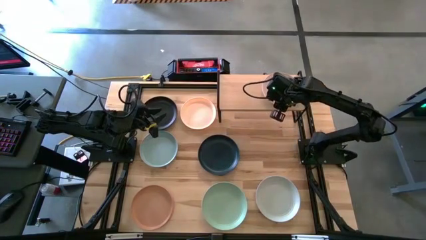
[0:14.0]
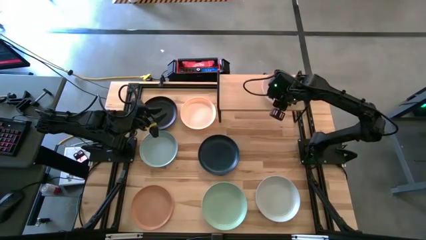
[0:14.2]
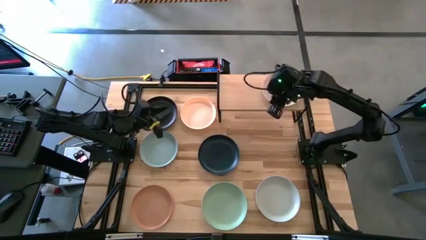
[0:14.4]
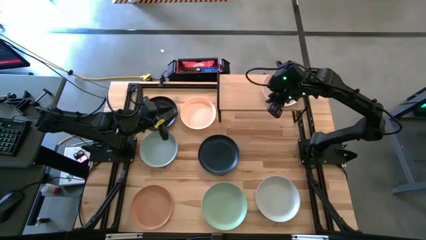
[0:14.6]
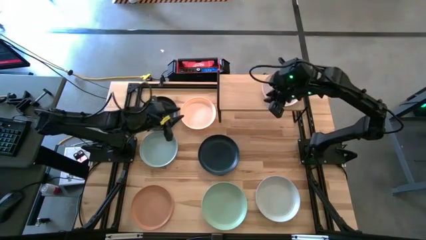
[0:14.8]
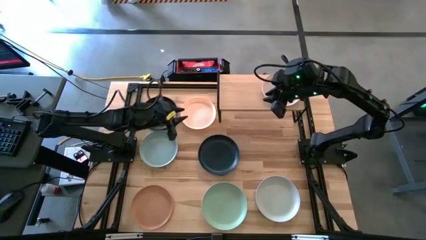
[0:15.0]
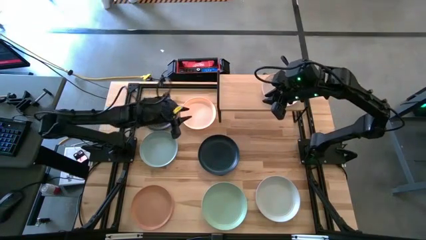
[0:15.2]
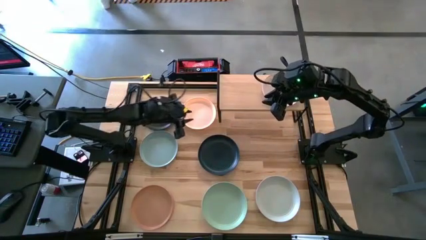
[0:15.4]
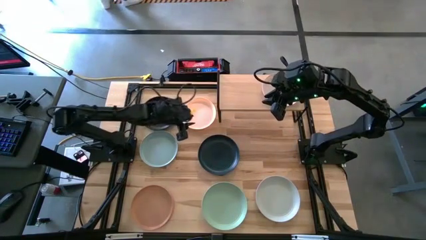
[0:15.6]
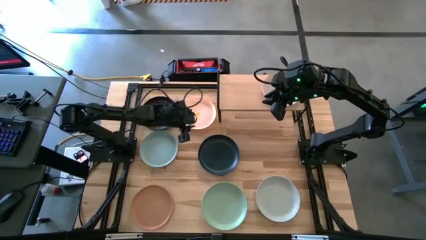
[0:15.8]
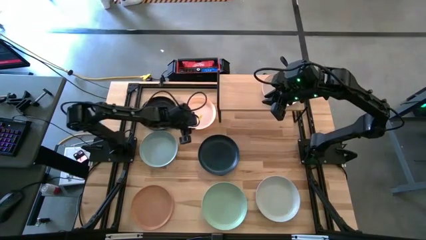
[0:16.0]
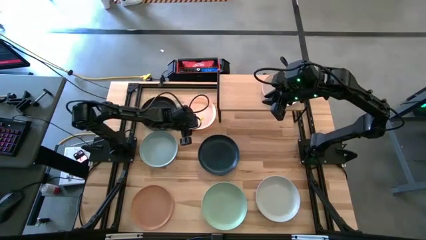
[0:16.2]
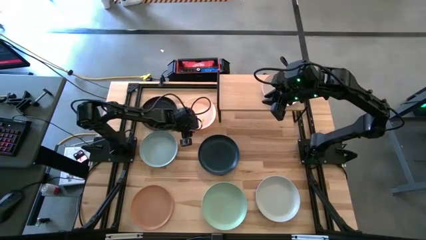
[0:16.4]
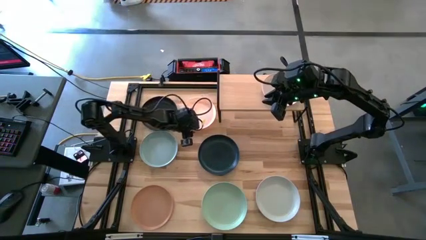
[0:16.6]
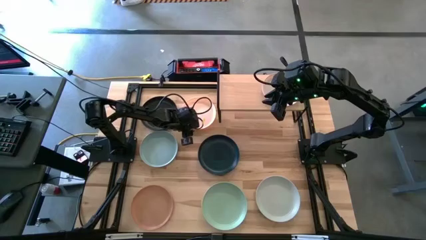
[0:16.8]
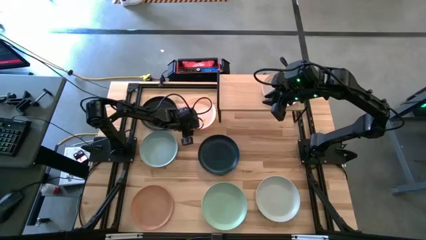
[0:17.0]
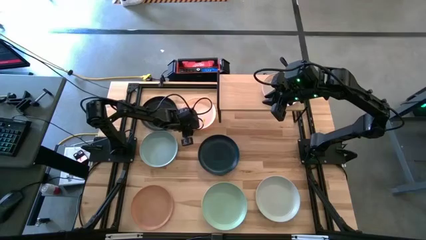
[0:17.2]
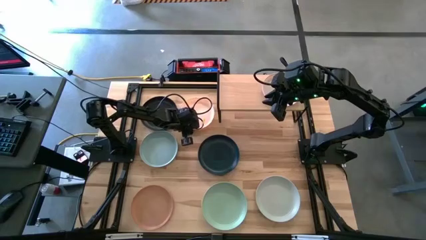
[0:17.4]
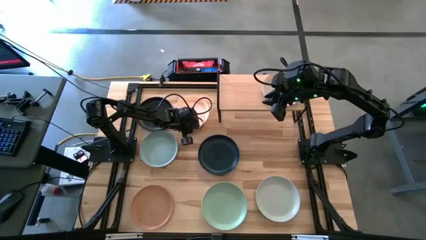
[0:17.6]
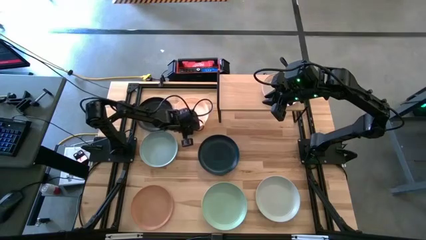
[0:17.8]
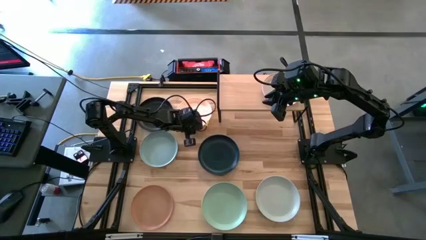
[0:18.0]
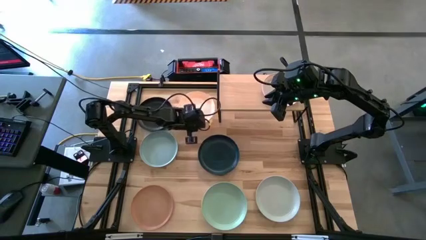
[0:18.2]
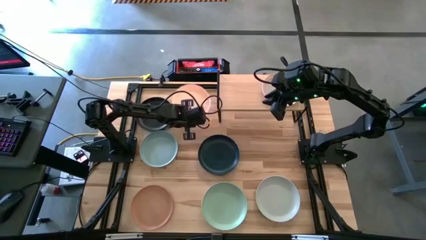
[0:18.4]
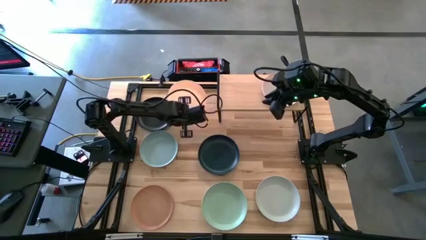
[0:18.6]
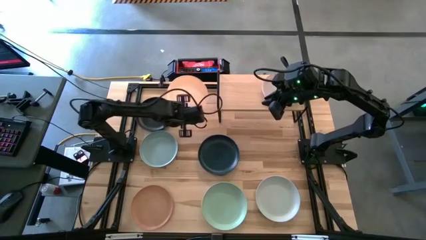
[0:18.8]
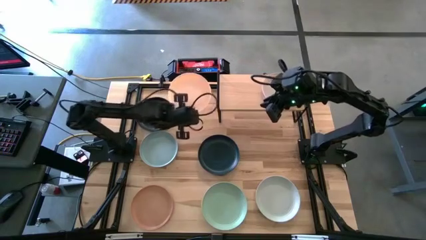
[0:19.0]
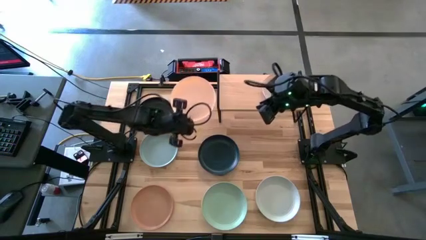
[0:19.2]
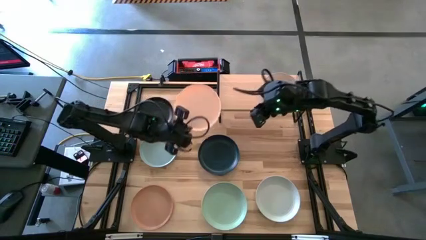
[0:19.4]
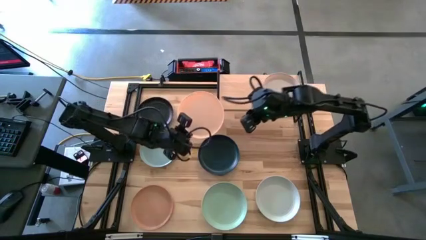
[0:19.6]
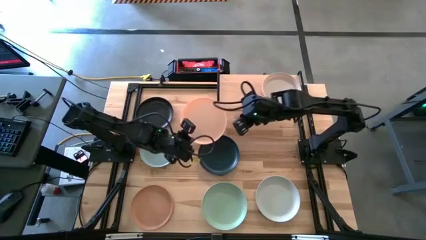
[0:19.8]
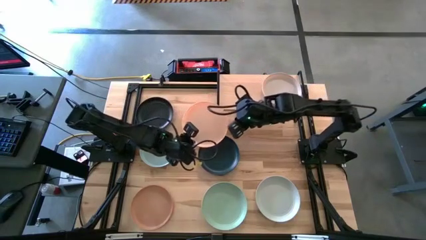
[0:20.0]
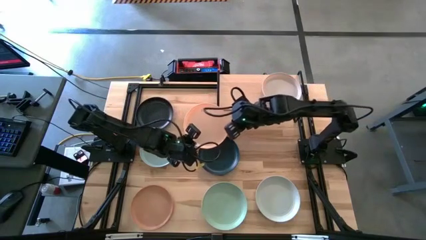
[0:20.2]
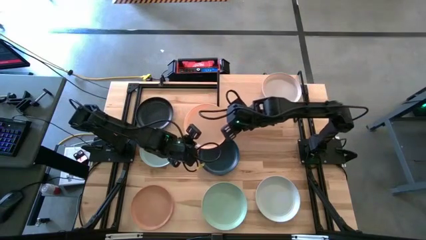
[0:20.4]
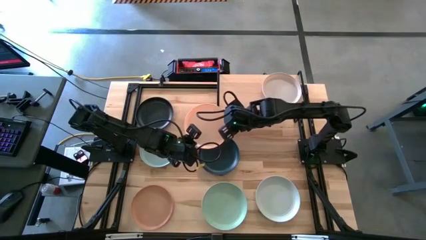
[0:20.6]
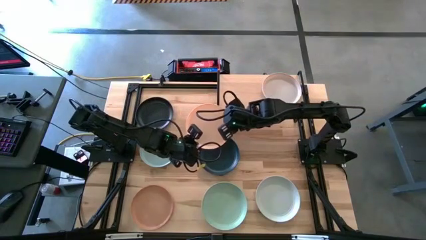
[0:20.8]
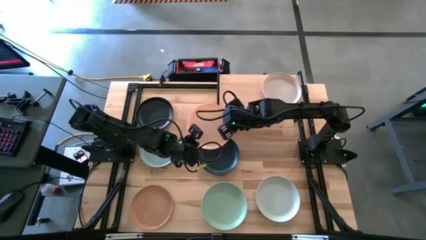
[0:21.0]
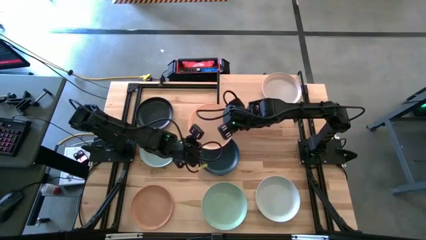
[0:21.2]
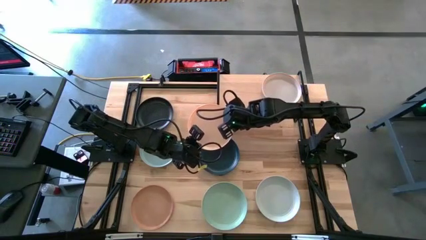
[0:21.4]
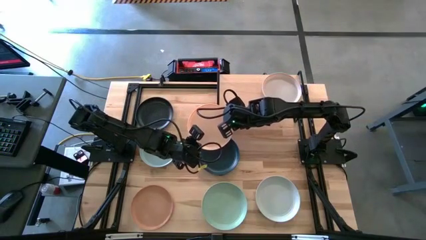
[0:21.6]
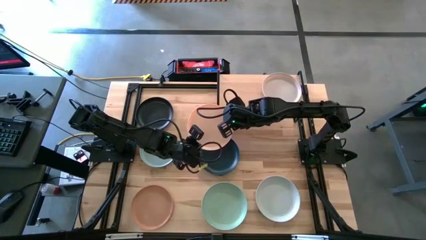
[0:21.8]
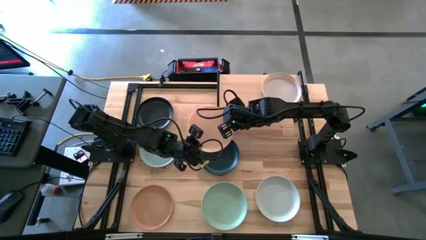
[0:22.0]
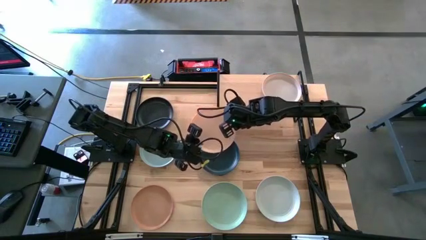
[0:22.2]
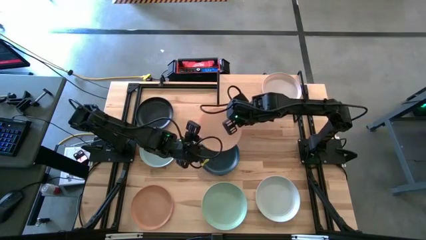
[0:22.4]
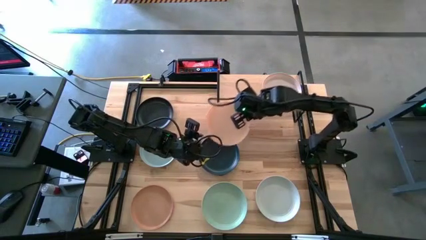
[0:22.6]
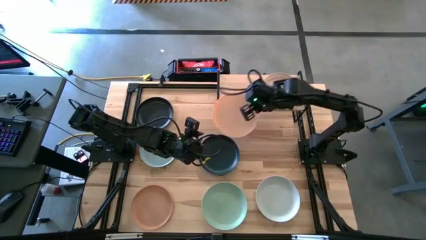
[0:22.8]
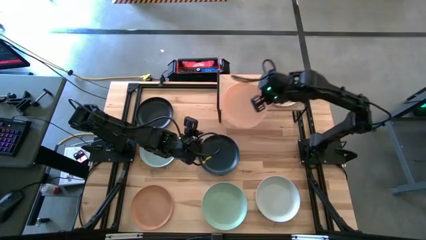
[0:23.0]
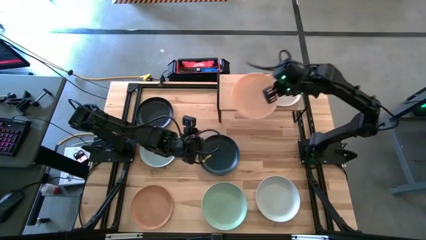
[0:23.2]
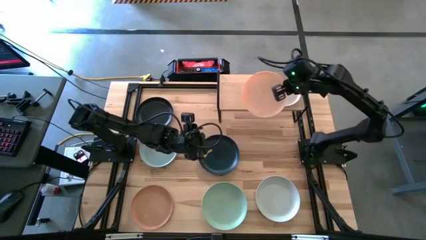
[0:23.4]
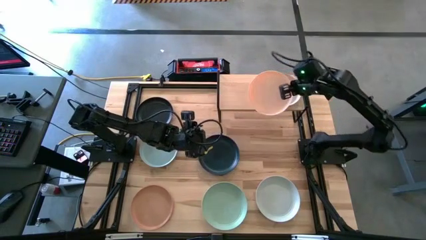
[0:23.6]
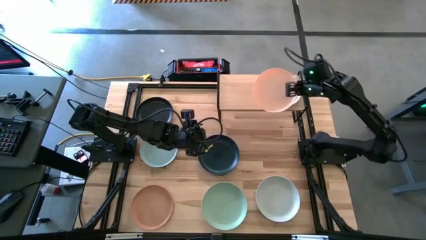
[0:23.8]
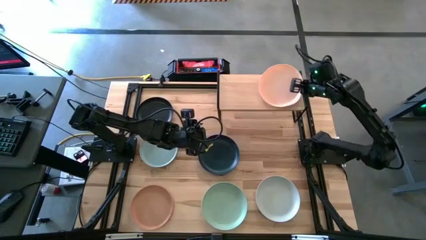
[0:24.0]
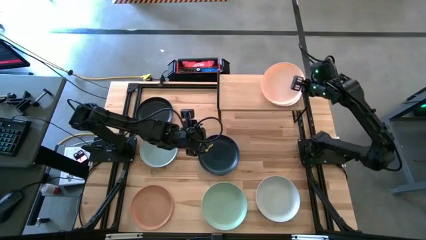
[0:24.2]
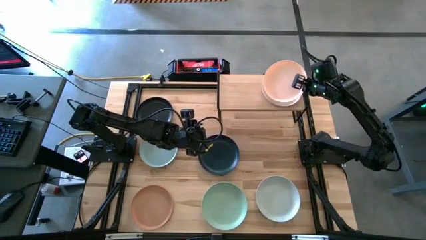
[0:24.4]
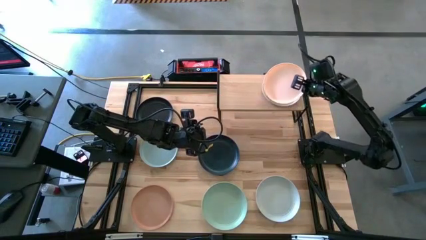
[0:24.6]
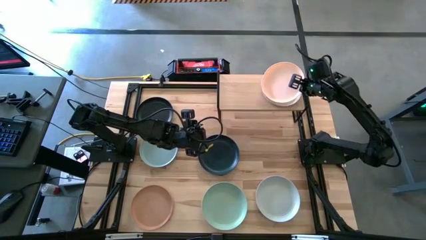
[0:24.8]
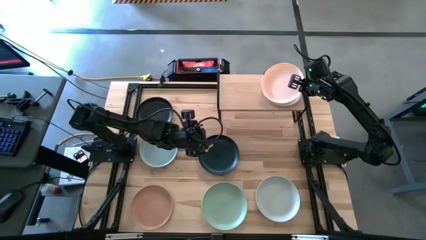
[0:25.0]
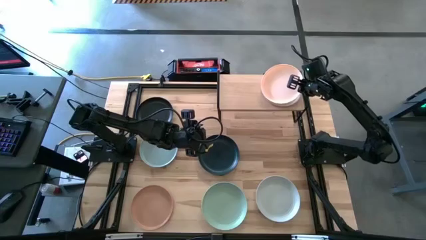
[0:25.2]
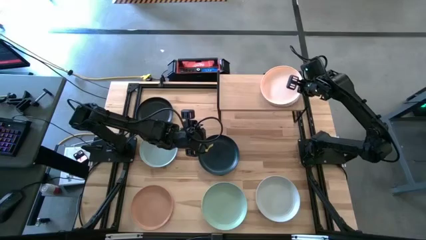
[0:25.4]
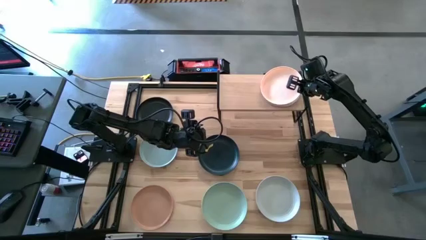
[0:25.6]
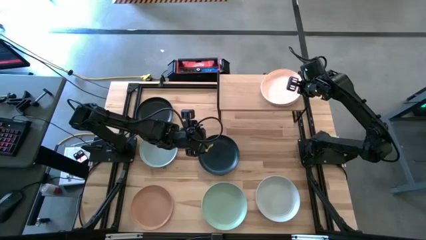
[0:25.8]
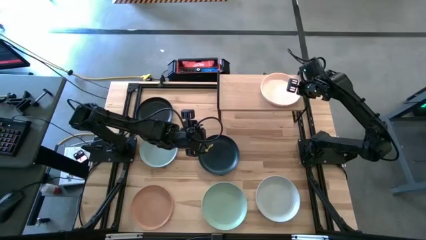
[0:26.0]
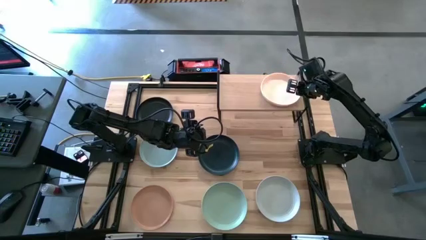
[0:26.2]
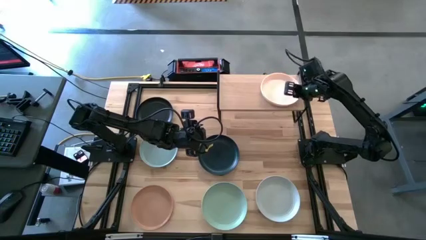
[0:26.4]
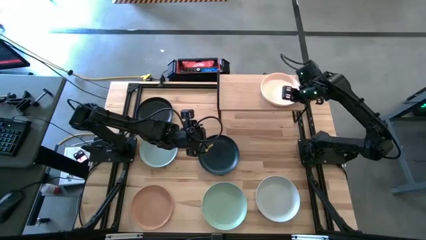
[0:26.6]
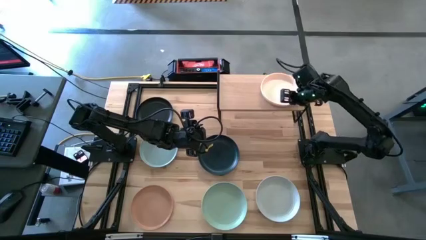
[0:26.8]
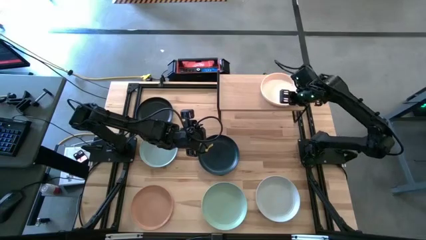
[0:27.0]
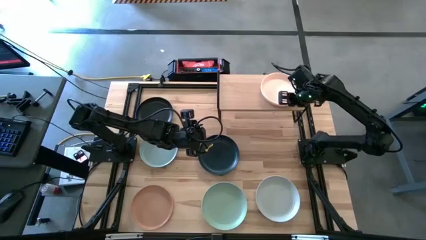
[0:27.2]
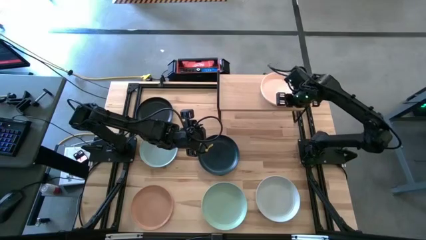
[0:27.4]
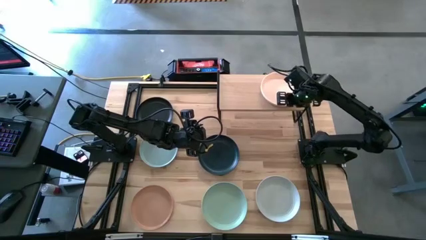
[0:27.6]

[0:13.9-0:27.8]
Task: Place and stack plates onto a shelf
Stack the orange plate on top of the white plate on the shelf
